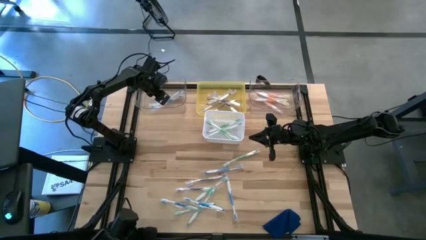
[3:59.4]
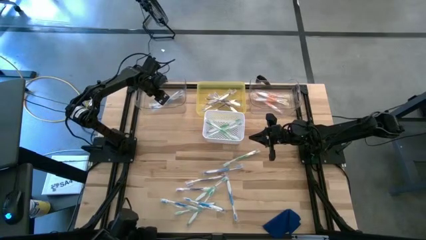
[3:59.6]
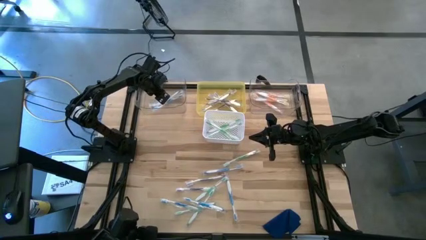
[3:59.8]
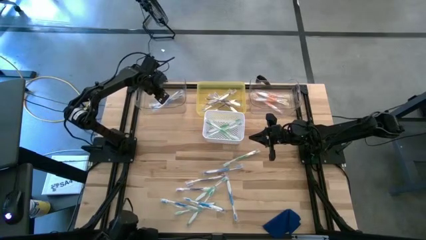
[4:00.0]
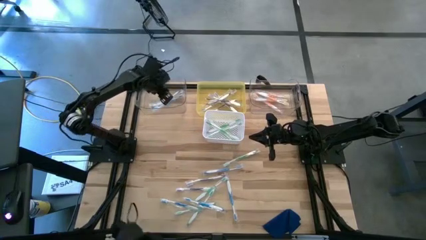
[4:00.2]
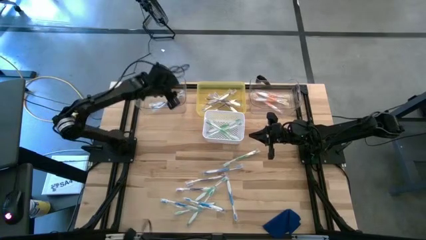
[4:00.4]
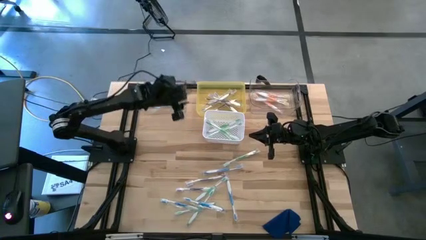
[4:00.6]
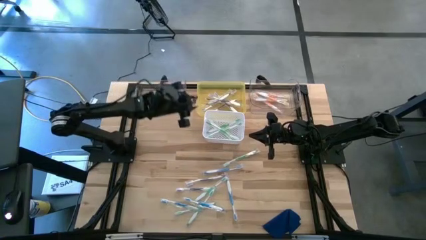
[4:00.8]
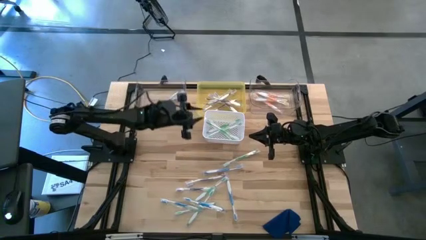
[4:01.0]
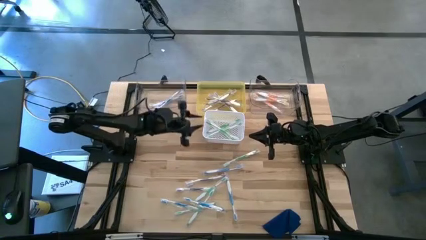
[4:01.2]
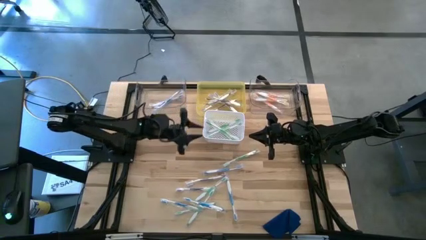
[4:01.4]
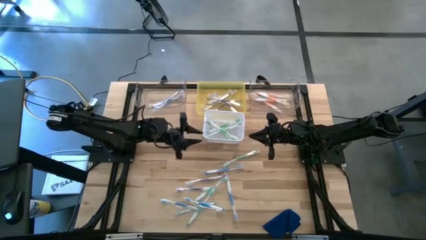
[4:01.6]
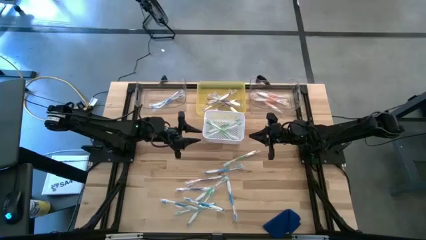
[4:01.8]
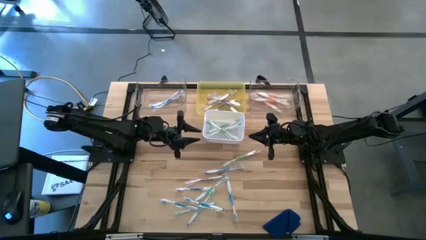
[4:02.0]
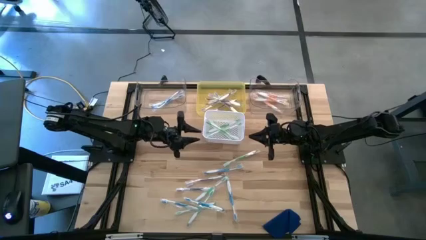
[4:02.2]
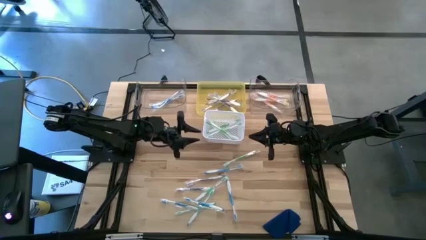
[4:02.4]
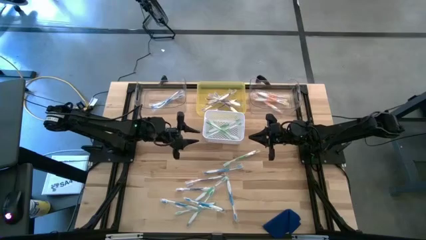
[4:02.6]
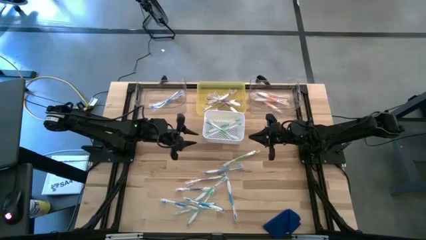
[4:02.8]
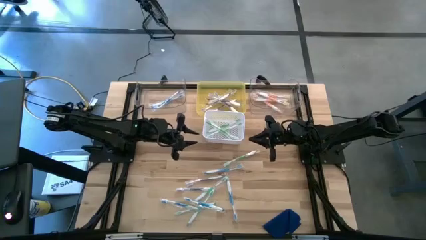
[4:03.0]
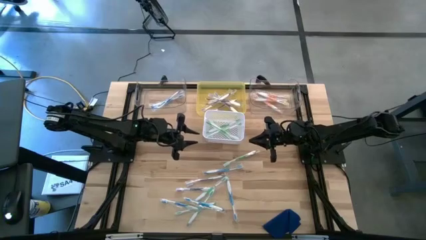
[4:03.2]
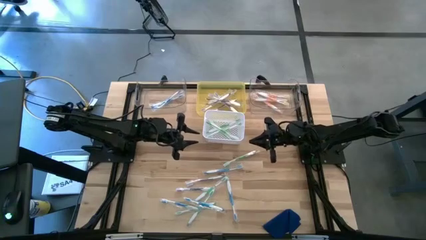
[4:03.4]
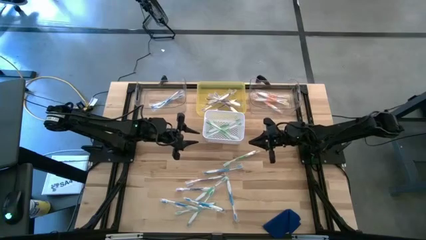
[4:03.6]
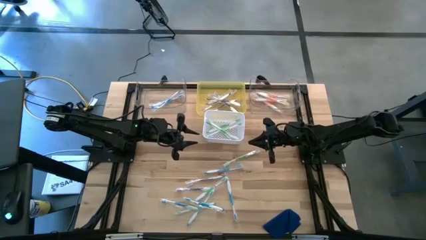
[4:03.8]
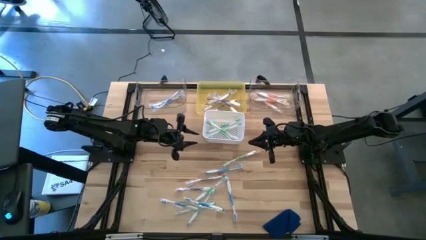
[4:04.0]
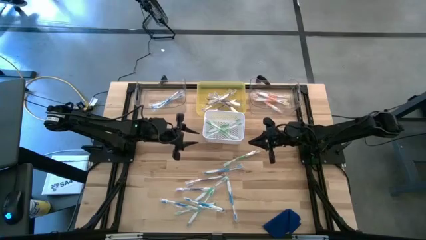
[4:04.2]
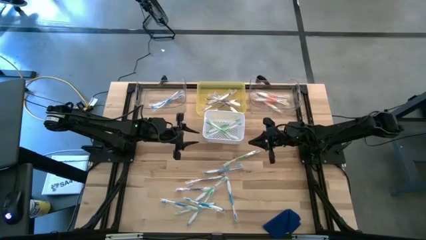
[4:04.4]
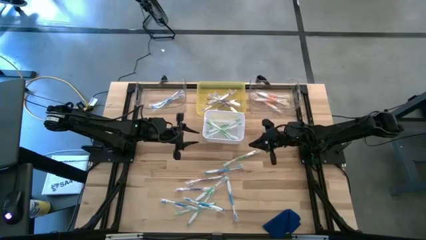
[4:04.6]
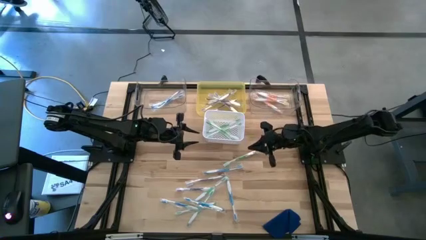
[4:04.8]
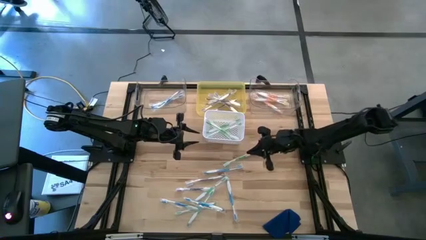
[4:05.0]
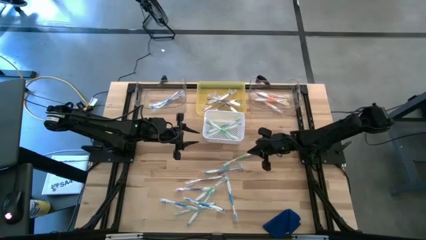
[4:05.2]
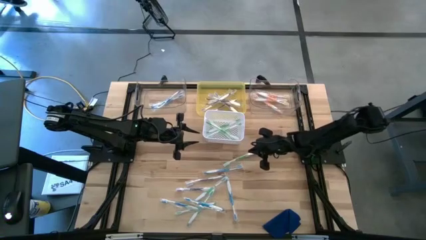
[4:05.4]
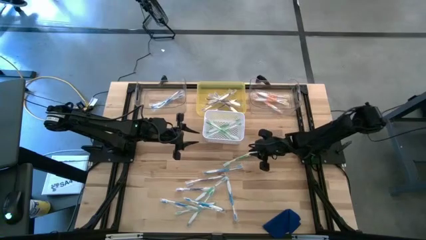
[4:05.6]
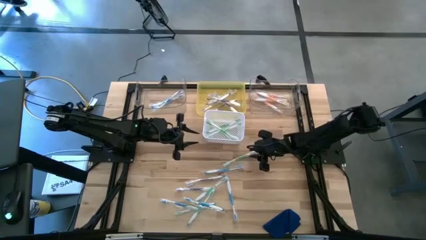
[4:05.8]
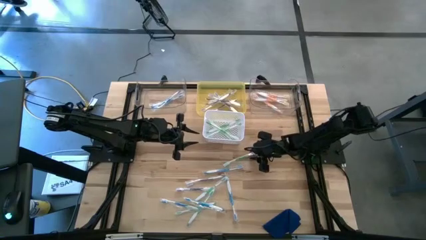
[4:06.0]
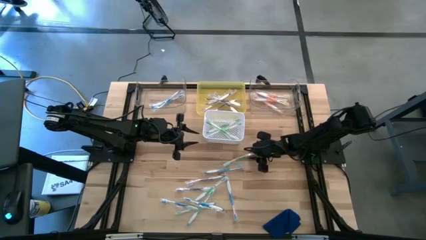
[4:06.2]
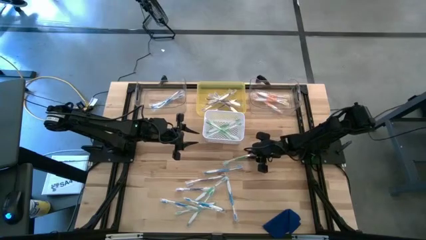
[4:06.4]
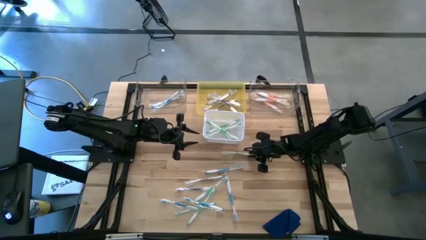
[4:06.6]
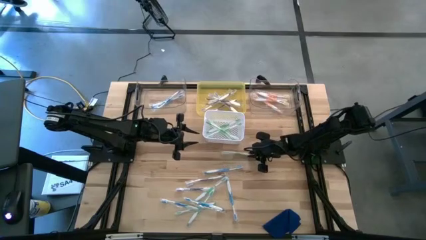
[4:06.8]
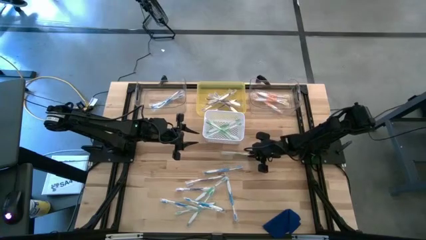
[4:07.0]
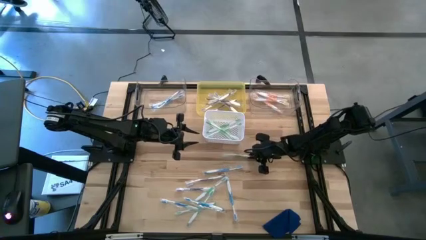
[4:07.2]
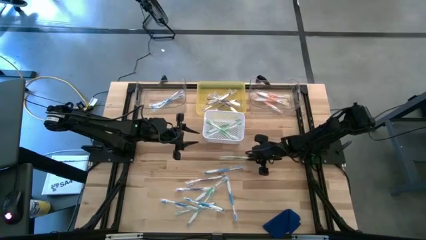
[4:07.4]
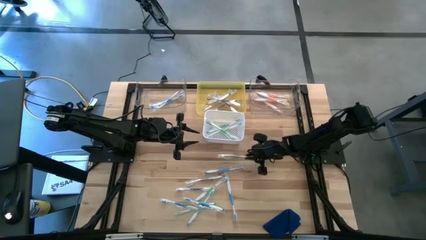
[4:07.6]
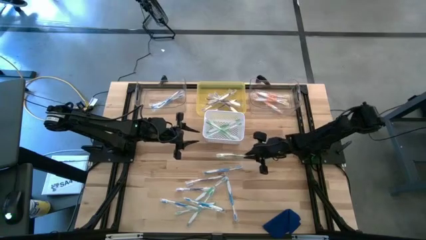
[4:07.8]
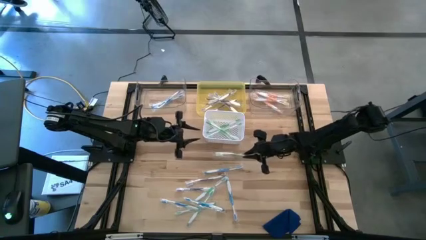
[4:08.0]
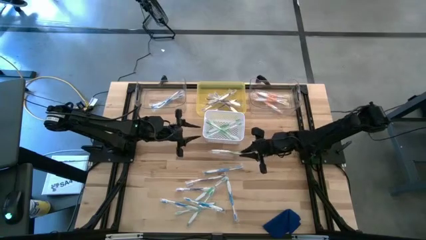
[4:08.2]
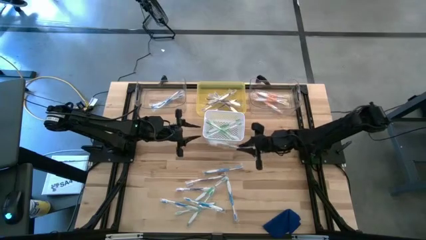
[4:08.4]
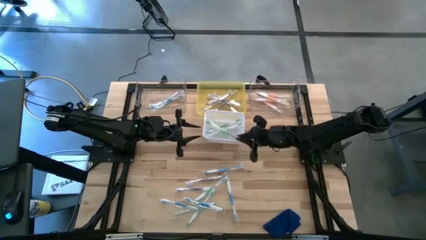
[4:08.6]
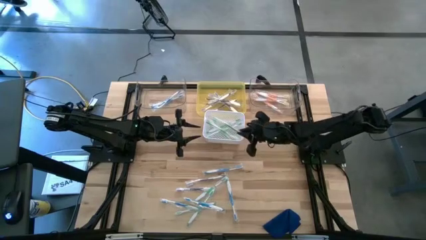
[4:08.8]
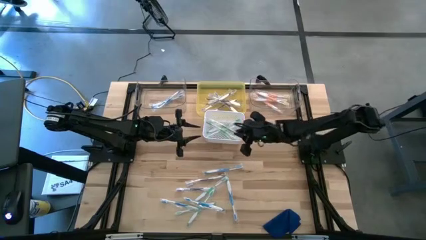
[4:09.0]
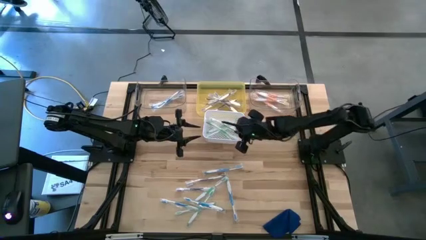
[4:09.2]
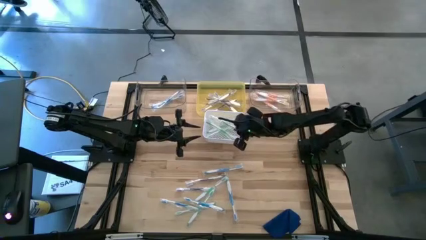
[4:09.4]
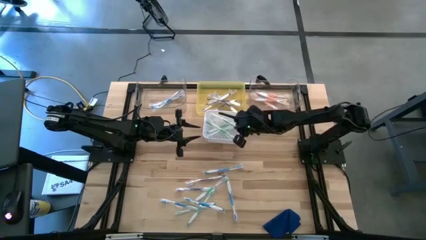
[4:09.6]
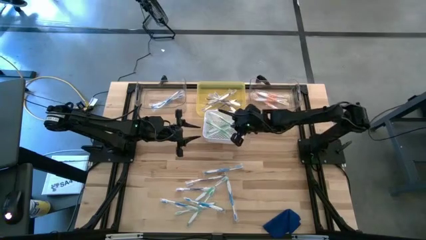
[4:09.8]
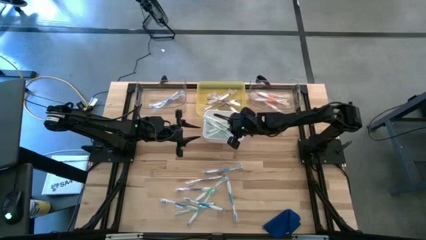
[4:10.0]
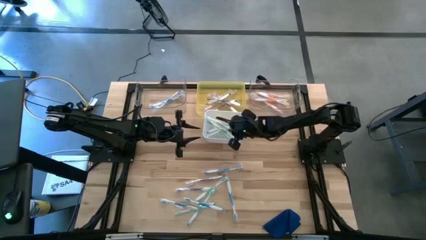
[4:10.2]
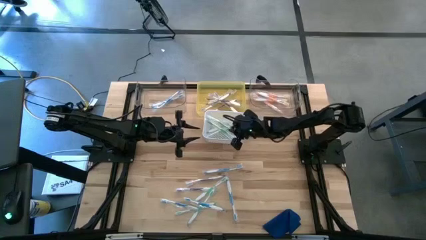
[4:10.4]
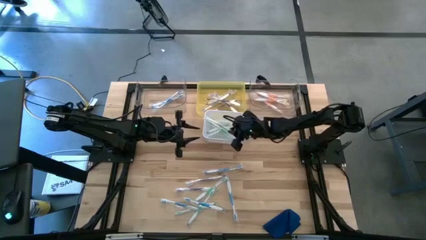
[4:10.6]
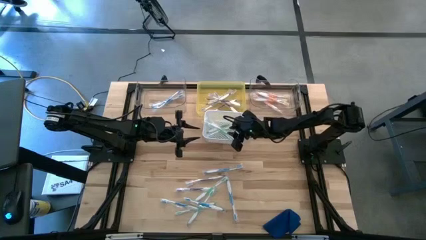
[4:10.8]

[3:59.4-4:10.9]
Task: Pick & Place Toothbrushes
Put the green toothbrush into the white bin
